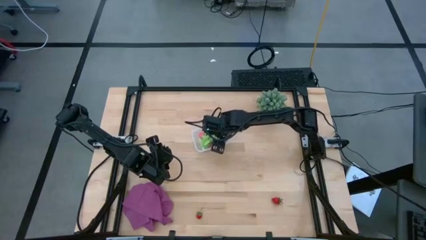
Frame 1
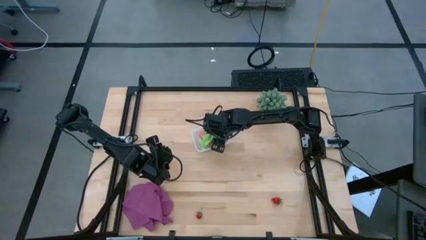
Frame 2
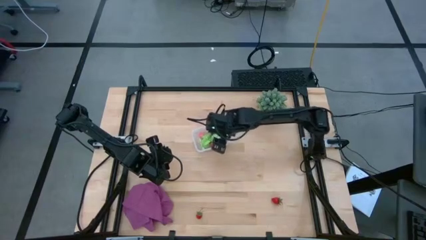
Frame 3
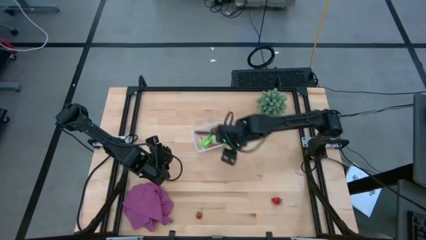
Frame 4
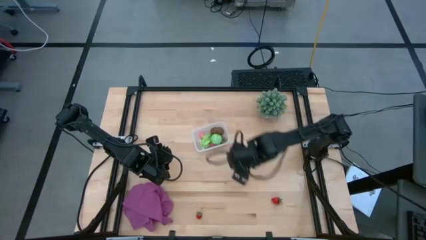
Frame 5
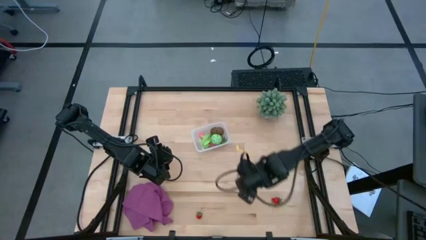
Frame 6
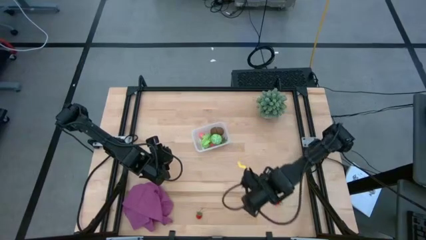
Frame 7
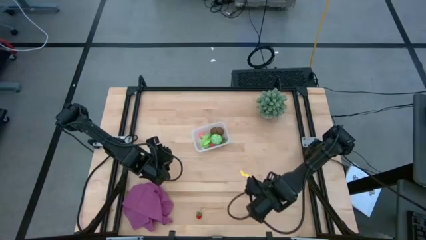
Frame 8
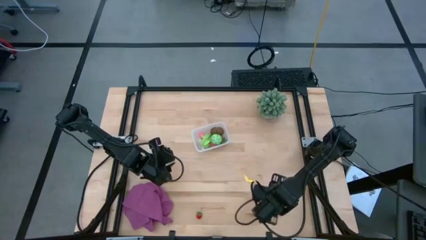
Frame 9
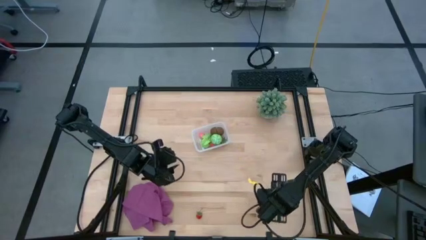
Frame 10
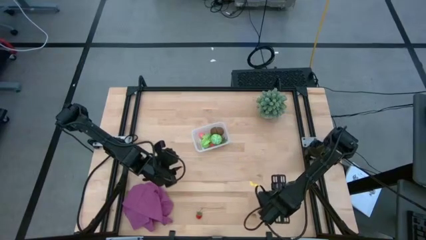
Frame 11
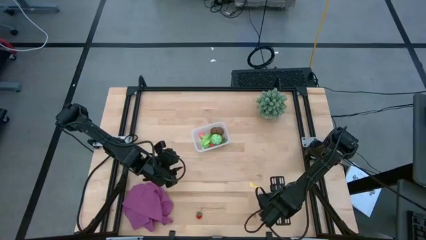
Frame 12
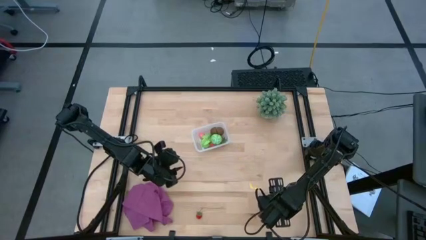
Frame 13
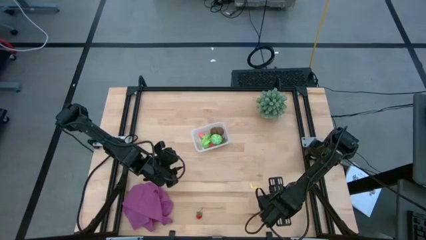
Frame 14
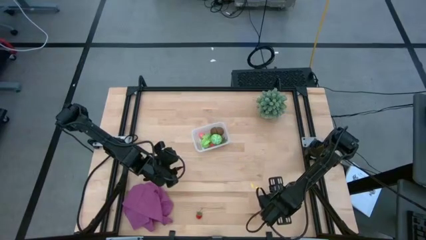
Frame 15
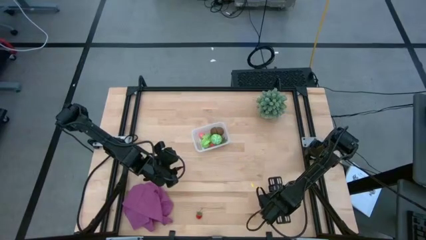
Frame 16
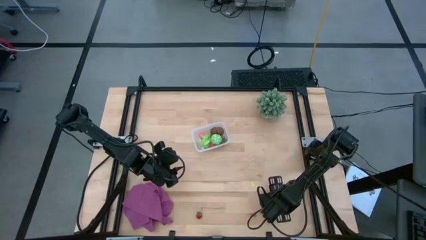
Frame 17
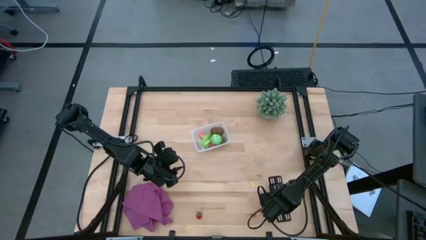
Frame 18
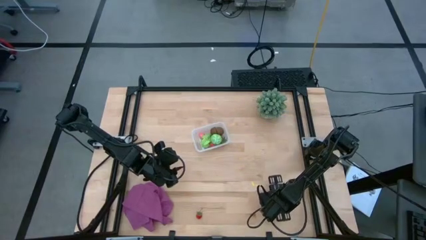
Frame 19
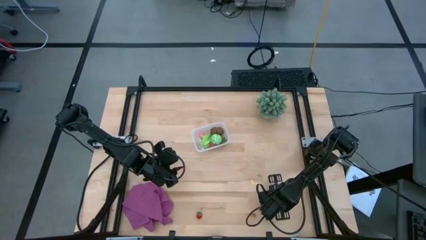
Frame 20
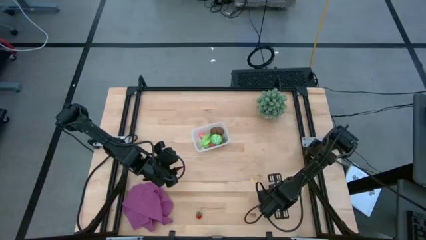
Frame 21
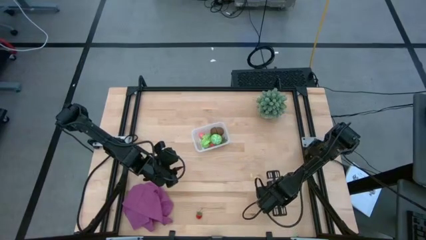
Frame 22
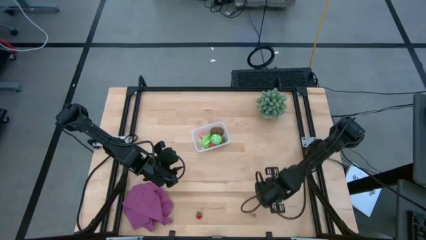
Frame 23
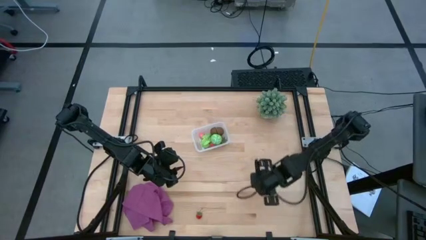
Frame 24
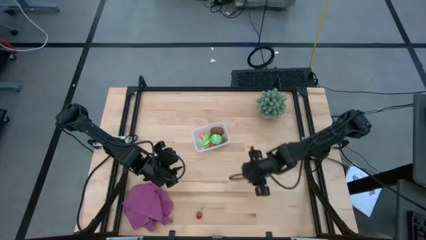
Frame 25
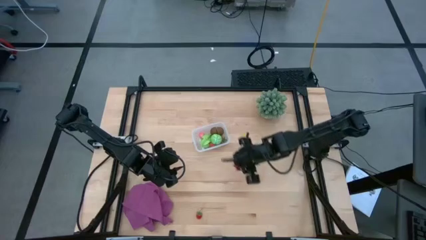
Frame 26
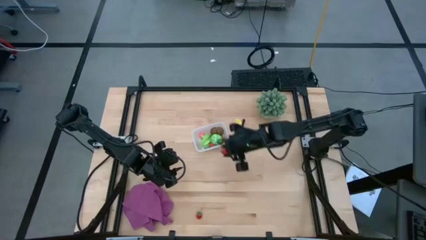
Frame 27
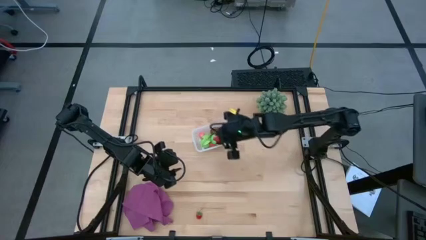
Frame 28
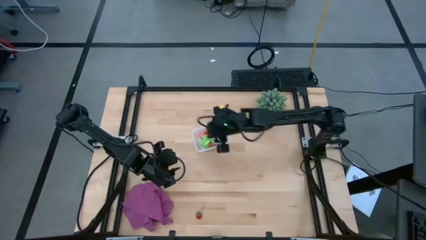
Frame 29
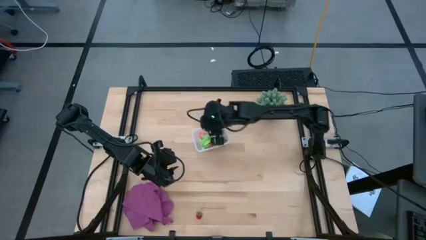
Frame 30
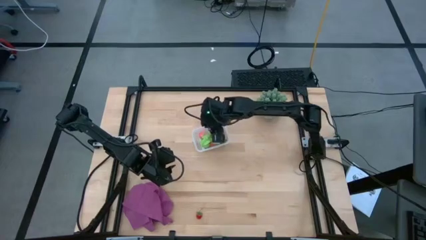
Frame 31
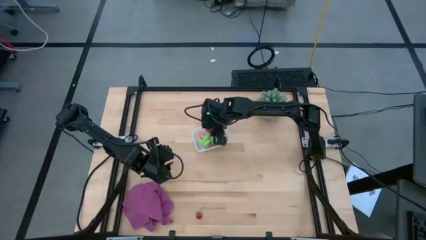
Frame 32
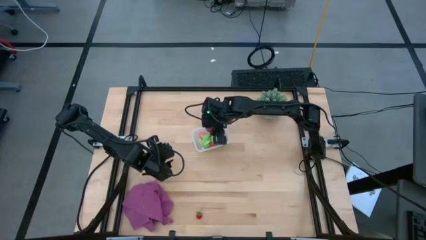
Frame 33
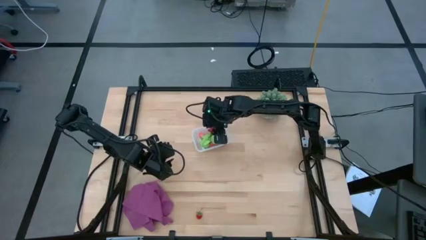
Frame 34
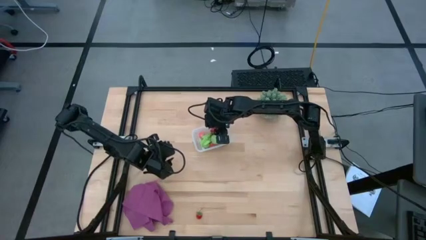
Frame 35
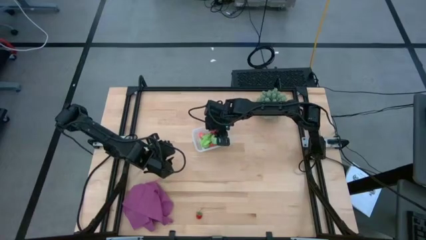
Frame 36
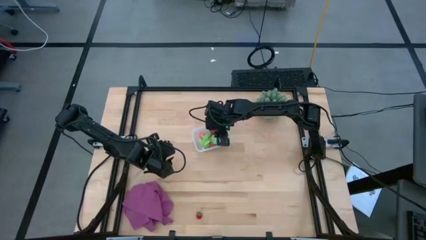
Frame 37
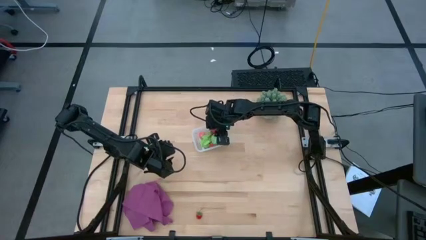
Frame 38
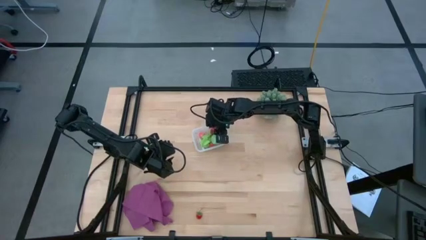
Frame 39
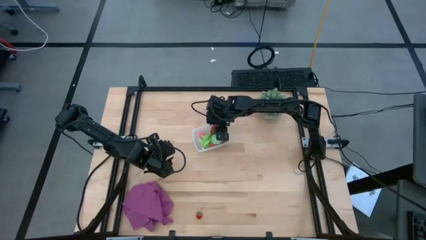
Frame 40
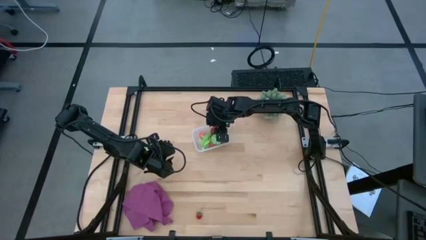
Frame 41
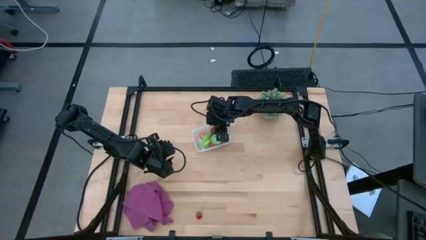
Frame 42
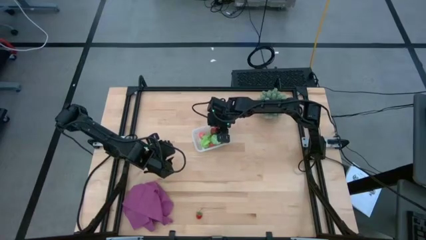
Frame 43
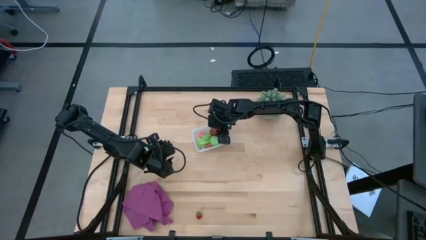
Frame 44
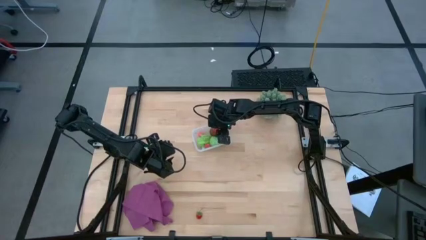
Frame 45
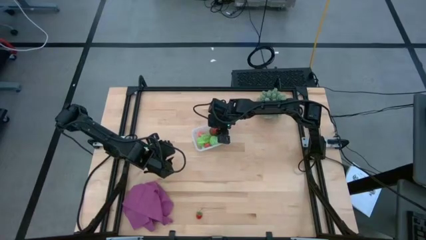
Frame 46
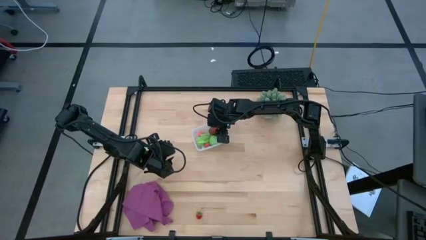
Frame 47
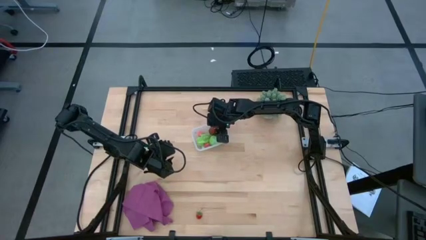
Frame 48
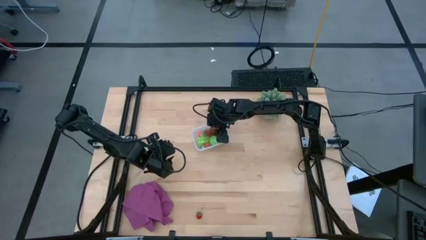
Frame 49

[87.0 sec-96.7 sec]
Task: Pick and placing Produce into tupperware
Put the right red strawberry into the transparent container

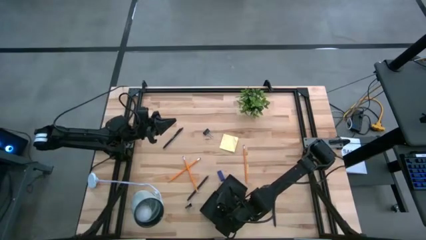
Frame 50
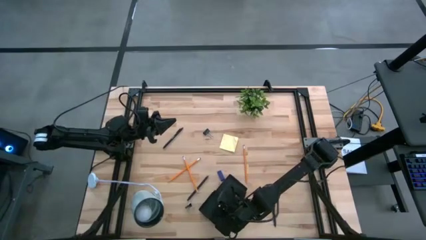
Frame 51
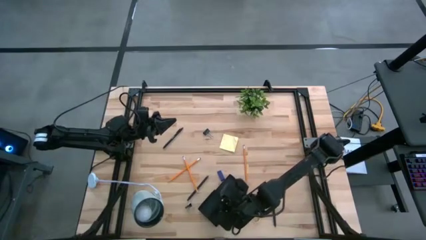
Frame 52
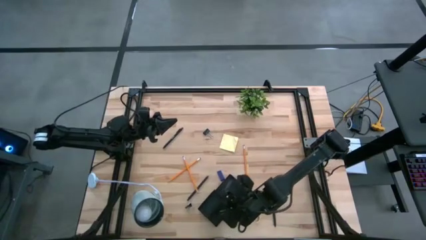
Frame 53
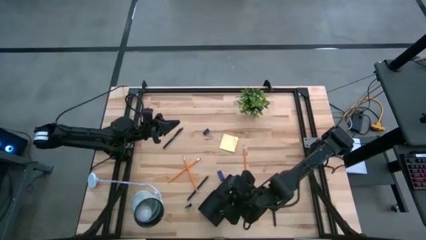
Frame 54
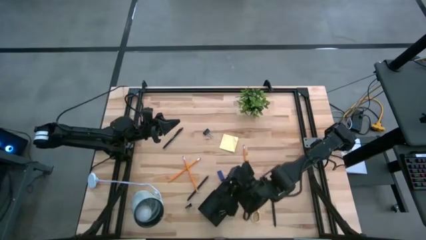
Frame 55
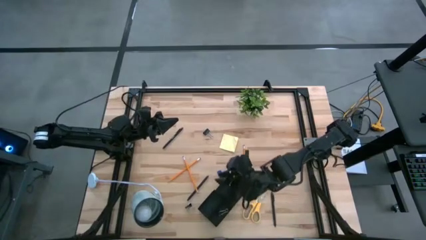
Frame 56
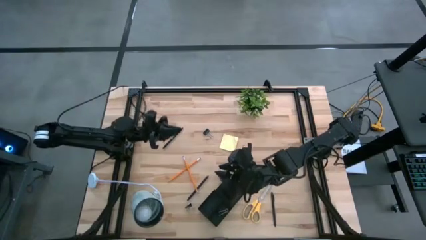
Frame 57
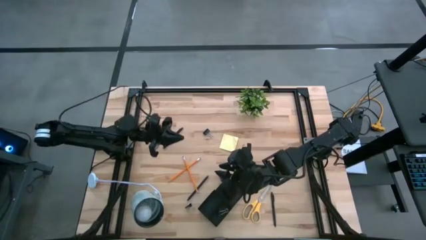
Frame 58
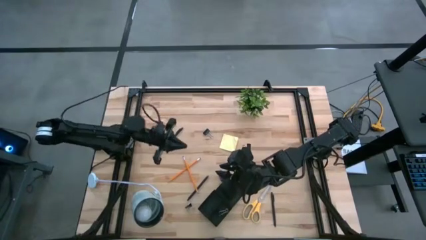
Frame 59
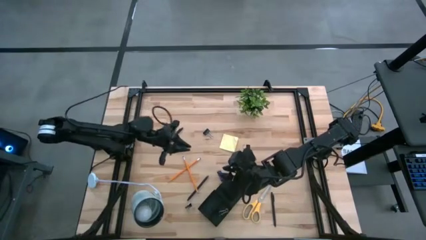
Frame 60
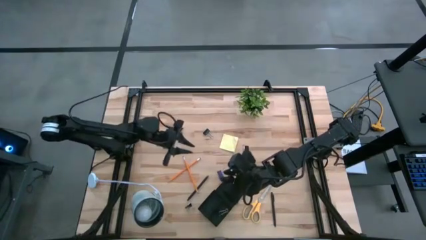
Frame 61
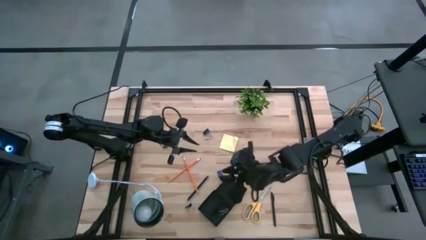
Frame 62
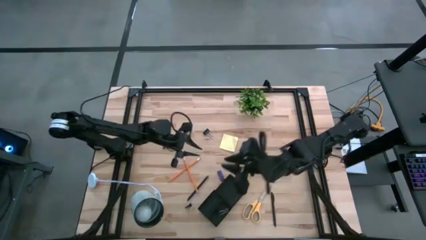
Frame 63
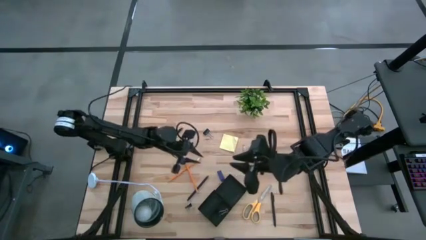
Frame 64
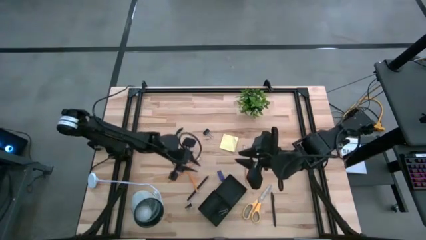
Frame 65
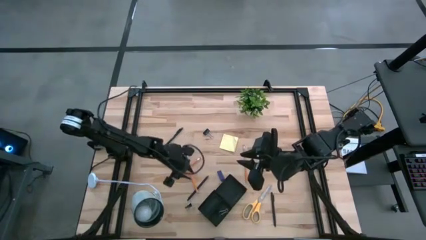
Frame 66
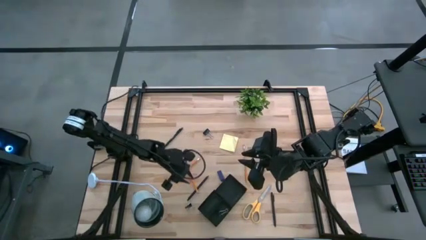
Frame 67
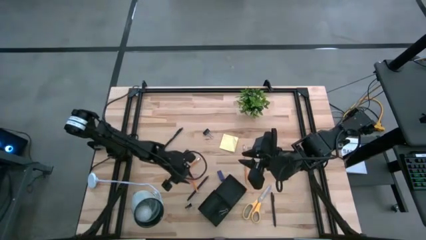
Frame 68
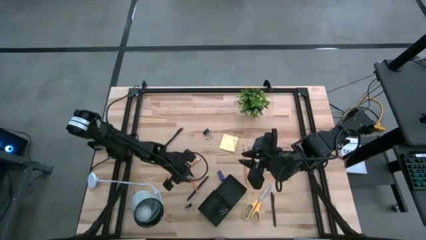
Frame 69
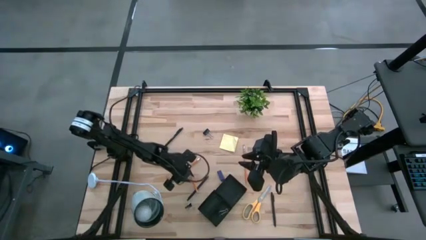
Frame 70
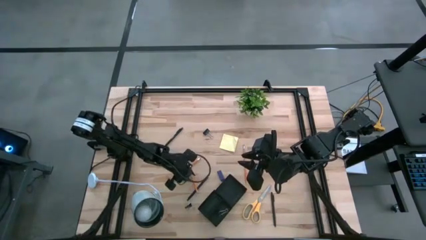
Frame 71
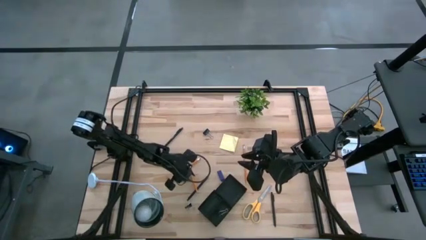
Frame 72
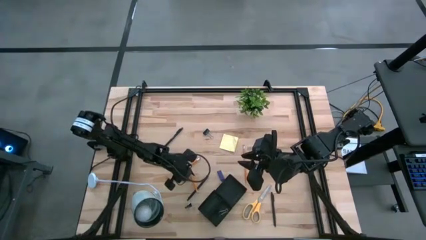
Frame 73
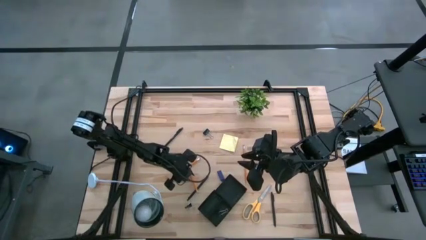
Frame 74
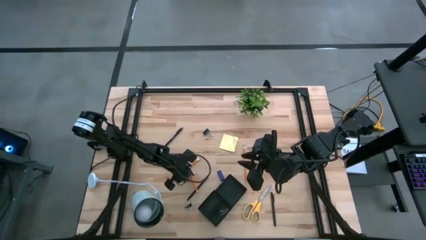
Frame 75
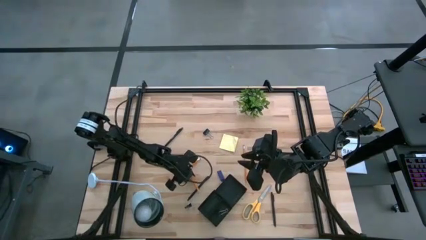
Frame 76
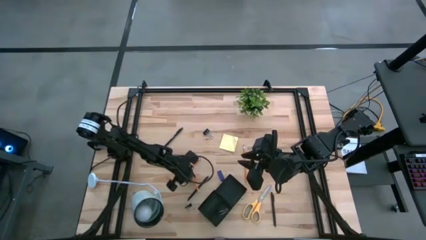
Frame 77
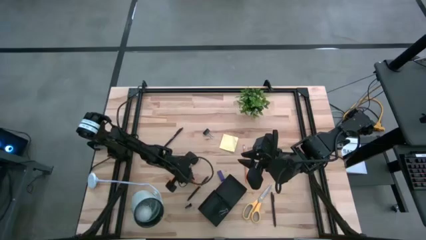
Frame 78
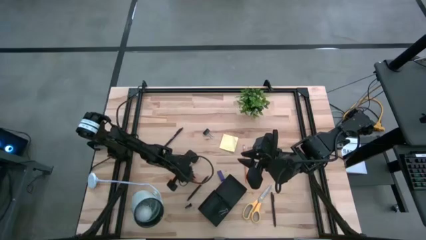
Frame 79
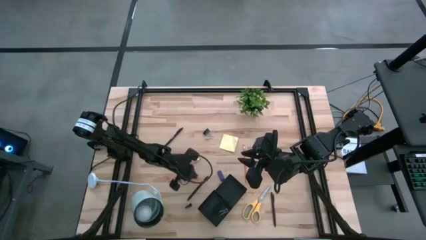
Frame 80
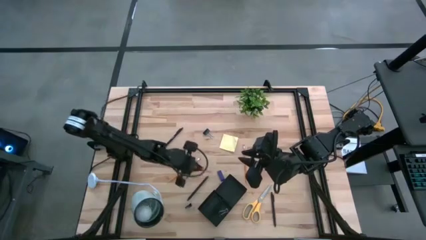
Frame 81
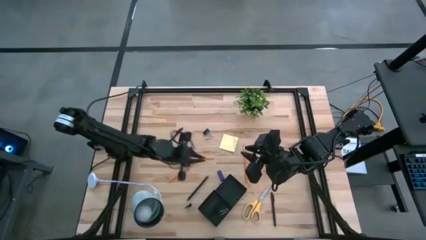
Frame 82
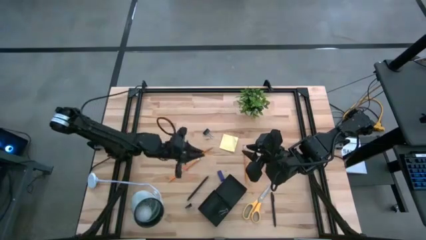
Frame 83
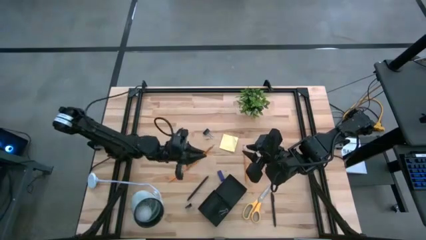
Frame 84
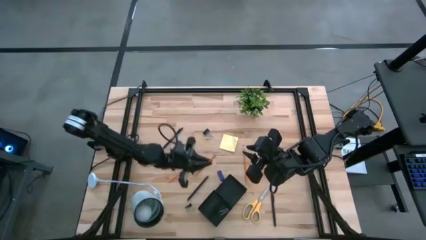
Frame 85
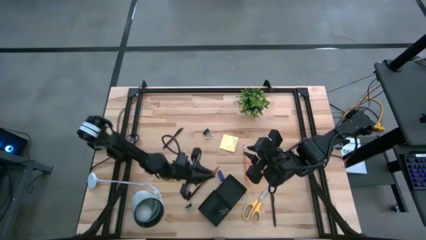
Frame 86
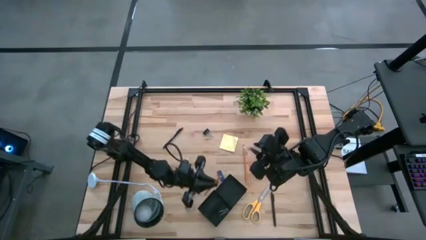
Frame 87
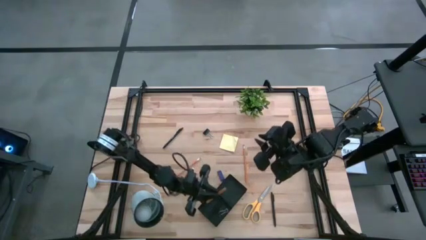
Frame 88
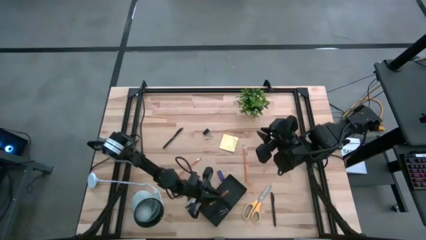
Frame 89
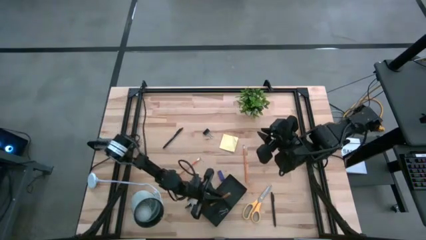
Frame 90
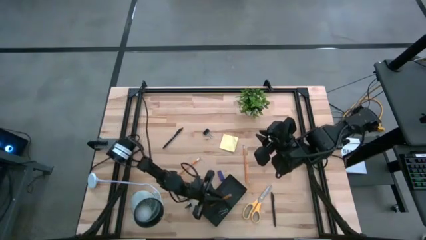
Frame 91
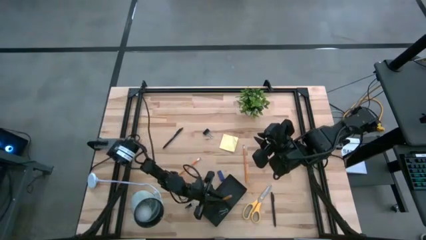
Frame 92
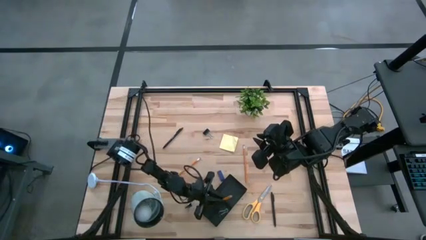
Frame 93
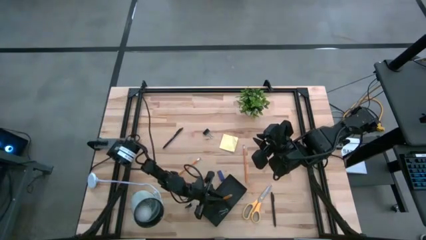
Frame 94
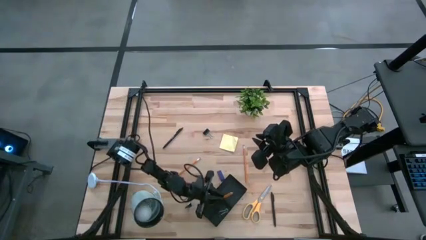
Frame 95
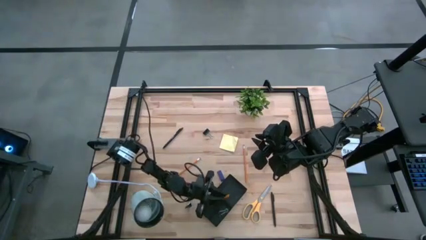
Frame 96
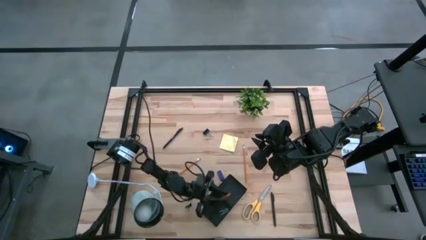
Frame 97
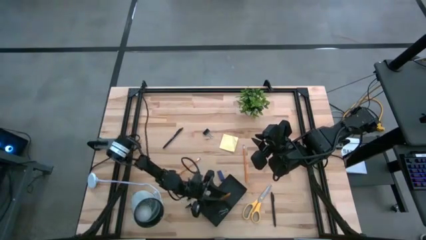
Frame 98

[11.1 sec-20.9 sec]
Task: Pick and place office supplies into organizer
Put the left top pencil into the desk organizer
